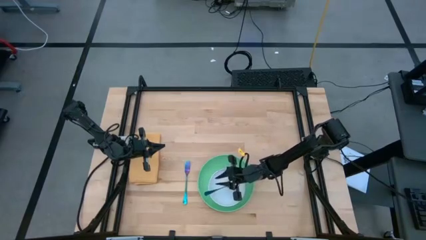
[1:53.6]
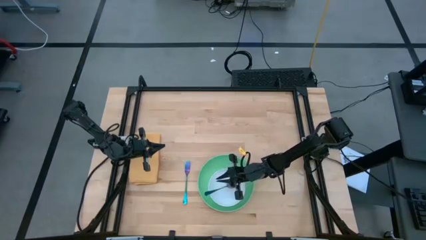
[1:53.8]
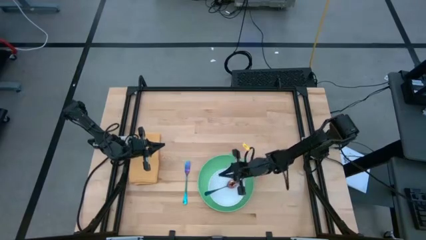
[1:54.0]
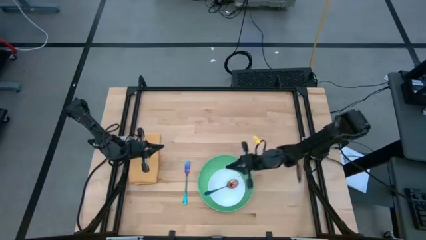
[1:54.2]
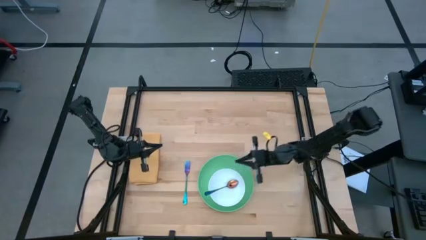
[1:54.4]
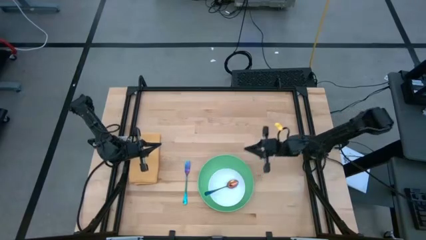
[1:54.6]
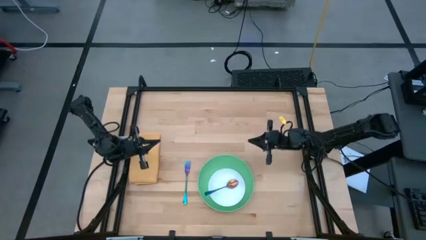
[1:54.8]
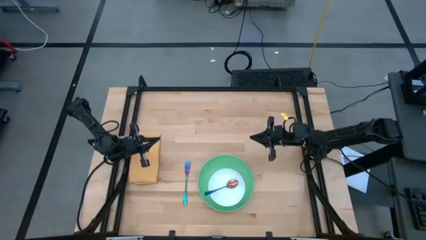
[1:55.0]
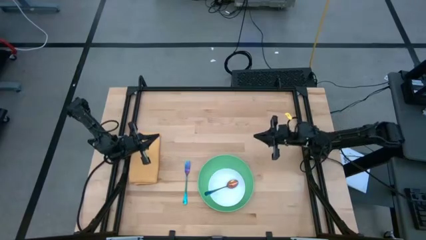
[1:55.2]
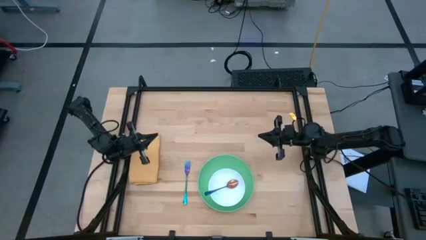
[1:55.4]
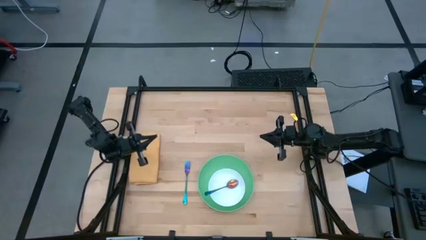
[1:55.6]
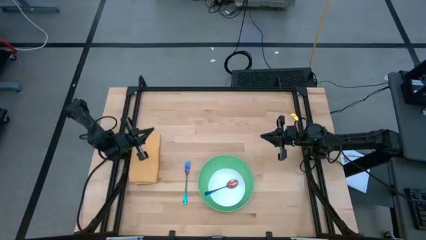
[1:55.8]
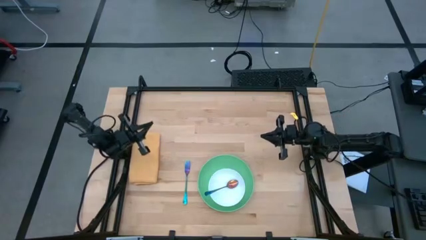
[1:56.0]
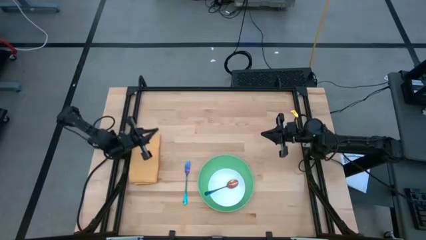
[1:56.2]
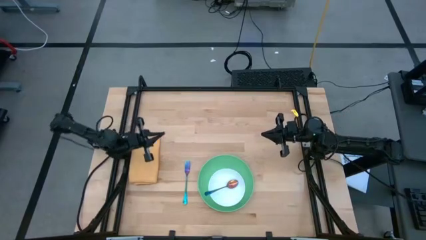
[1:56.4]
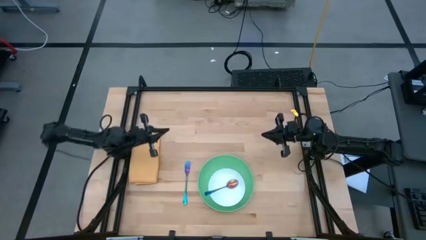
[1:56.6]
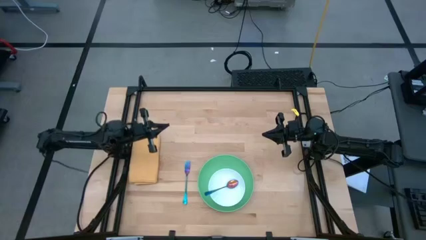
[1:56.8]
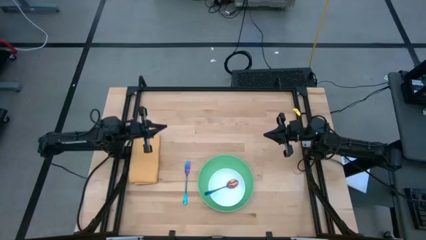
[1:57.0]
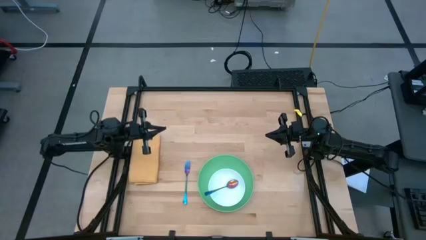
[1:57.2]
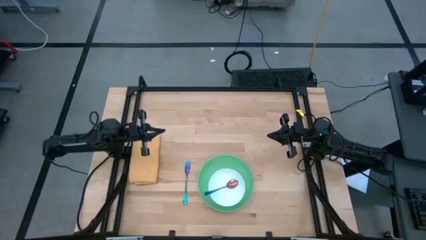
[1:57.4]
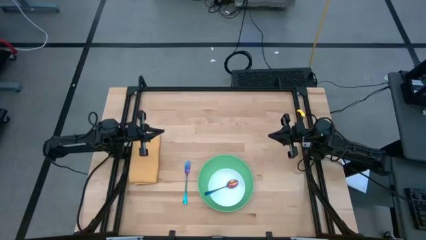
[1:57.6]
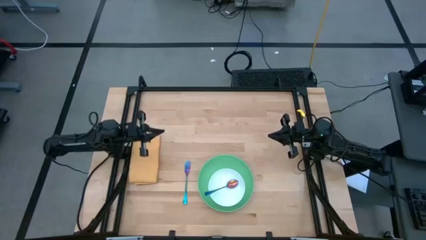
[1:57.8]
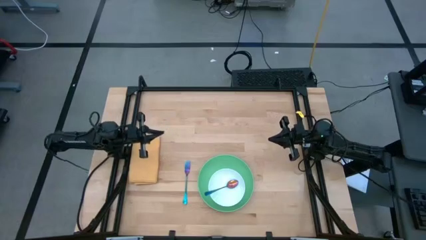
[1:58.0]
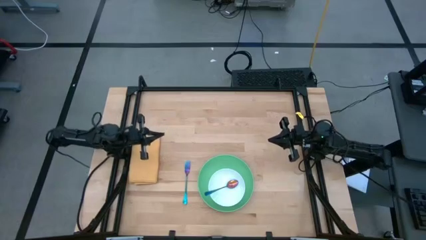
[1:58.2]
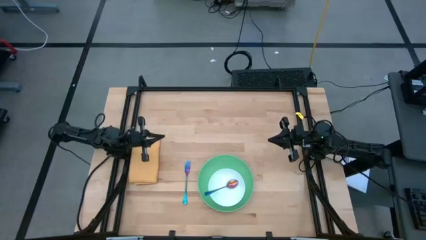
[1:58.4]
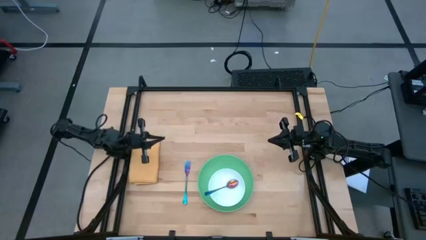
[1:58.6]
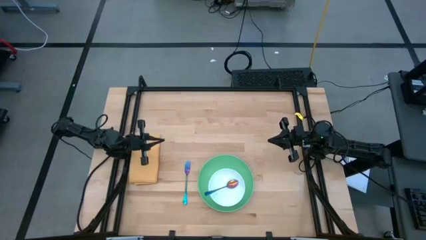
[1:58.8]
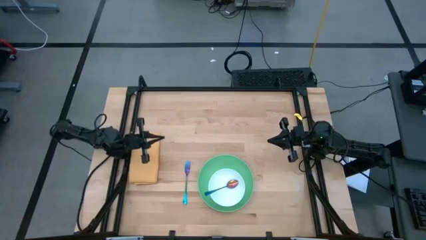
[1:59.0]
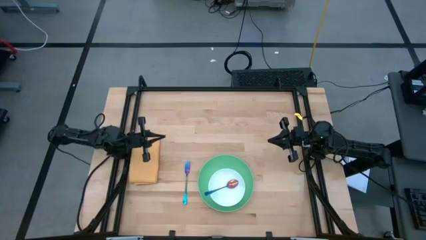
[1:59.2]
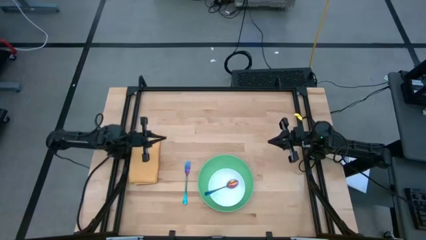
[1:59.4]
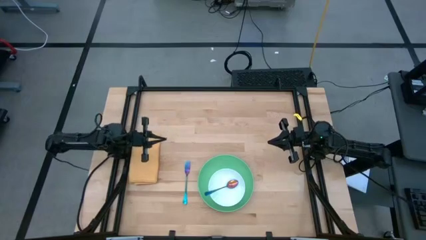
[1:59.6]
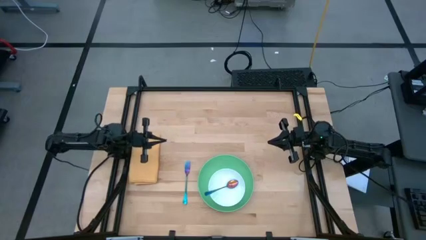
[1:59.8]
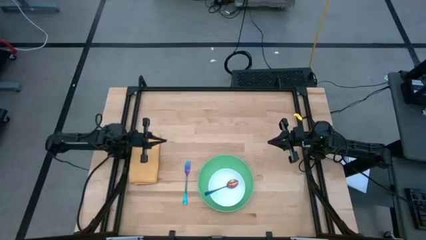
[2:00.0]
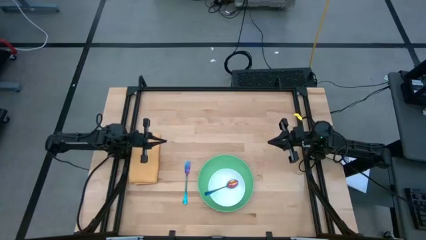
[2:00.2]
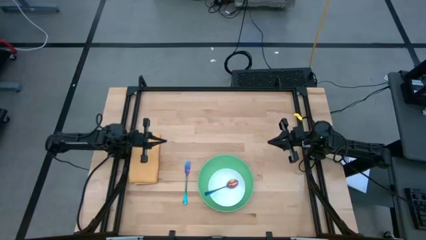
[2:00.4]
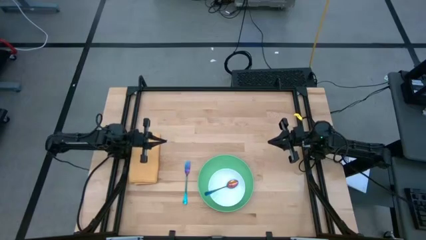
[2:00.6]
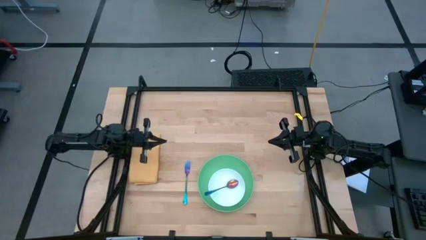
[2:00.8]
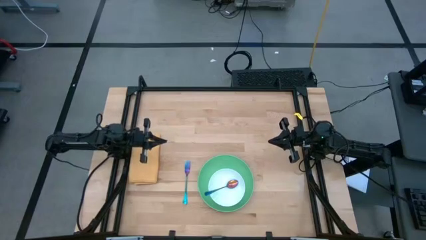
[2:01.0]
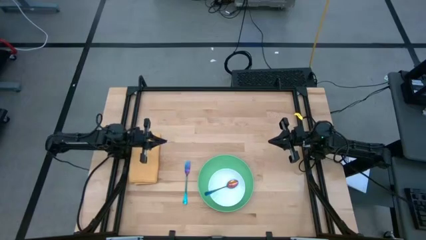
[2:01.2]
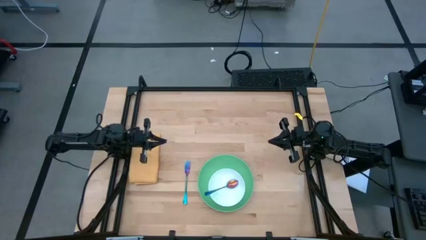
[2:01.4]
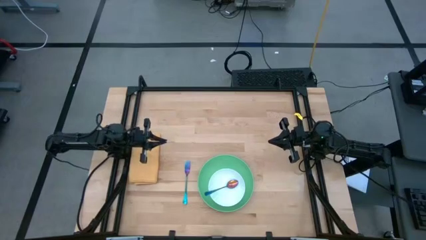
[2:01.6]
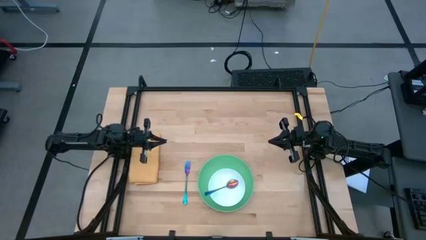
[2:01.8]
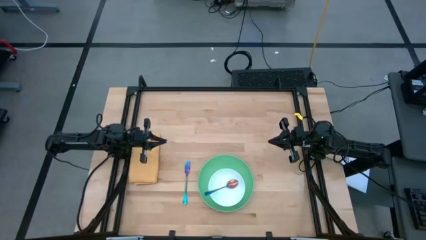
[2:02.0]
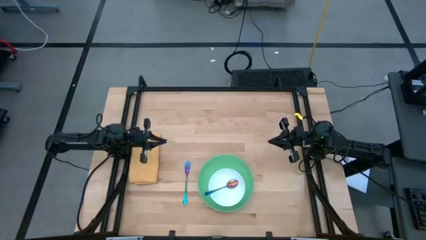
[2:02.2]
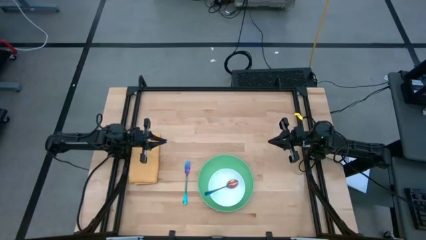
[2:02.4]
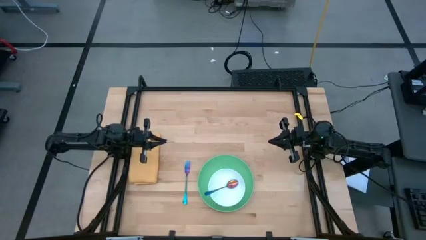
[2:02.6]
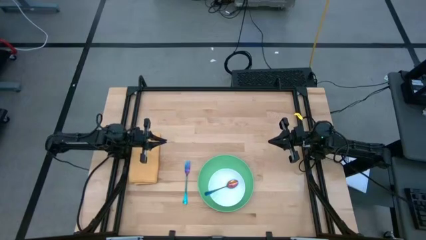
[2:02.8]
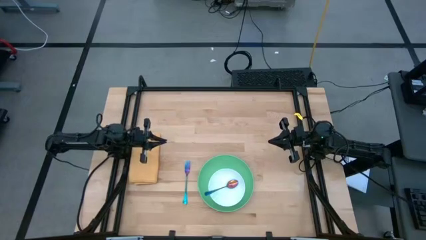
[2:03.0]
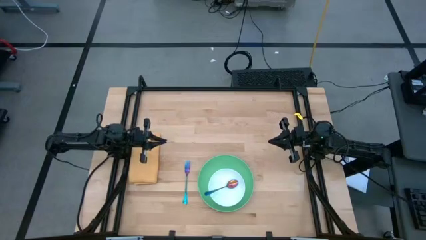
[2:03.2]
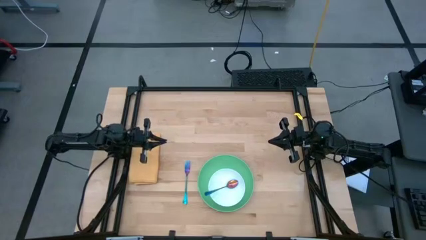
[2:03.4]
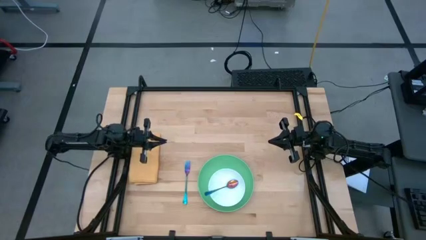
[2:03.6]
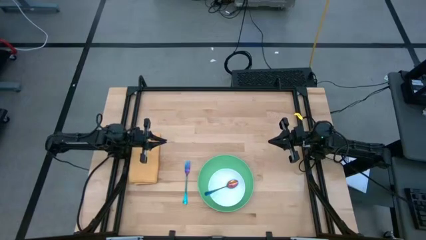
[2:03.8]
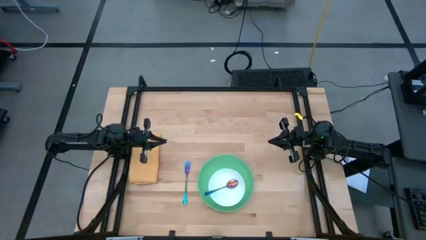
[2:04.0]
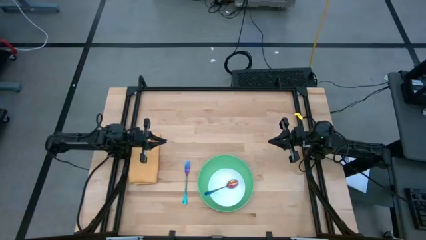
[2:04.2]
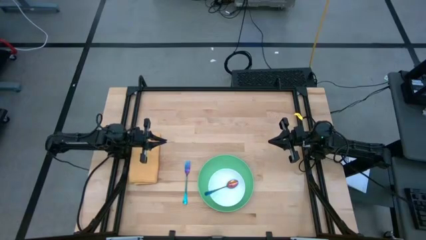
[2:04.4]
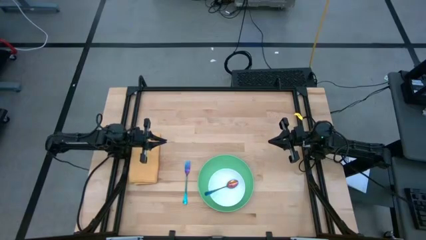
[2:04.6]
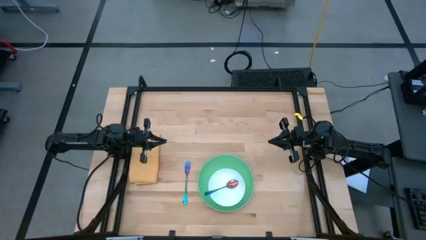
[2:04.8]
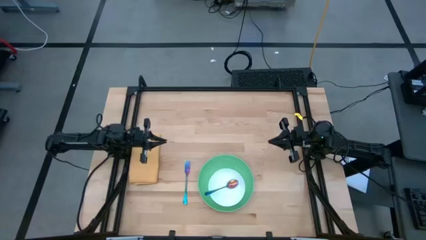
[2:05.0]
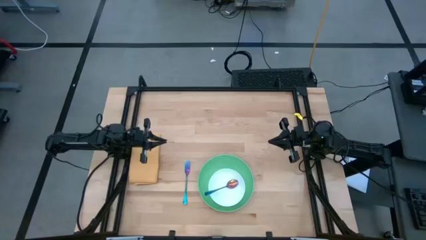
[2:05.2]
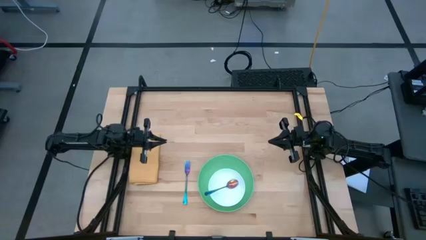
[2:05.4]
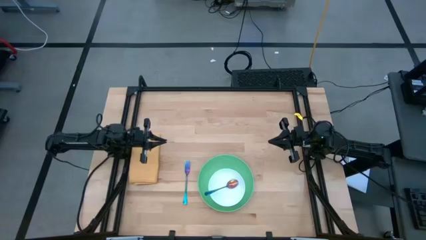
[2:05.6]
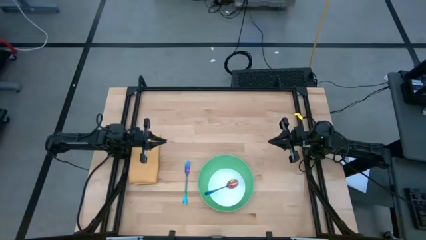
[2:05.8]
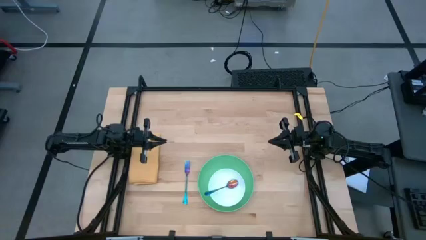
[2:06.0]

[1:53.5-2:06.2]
Task: Set table place
Return to Home Position
